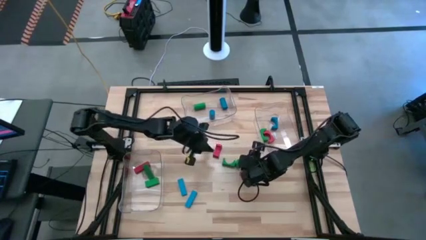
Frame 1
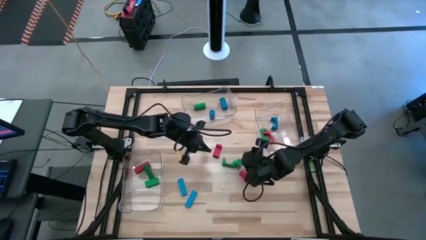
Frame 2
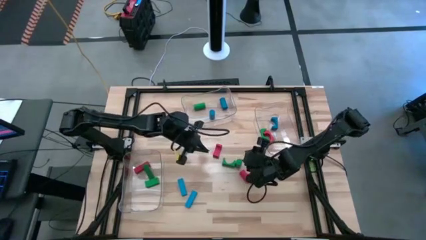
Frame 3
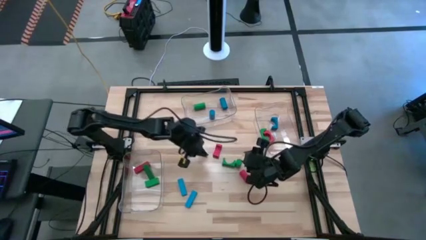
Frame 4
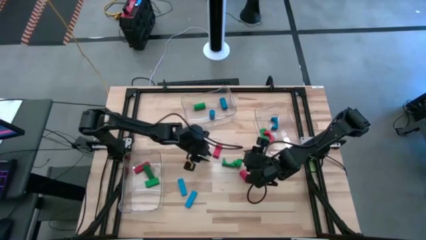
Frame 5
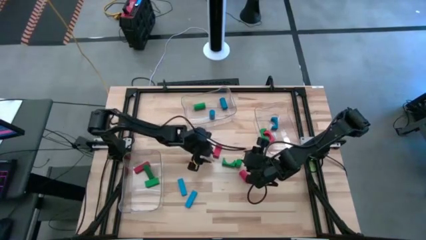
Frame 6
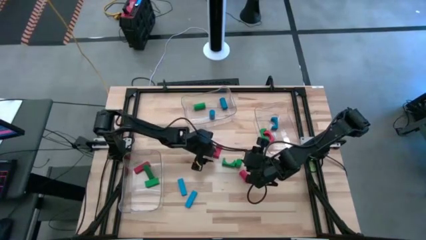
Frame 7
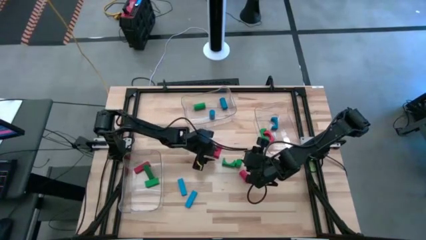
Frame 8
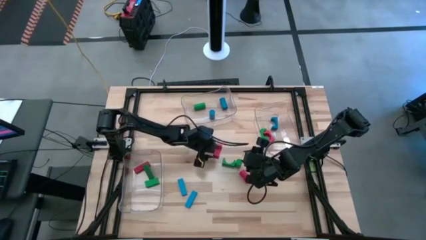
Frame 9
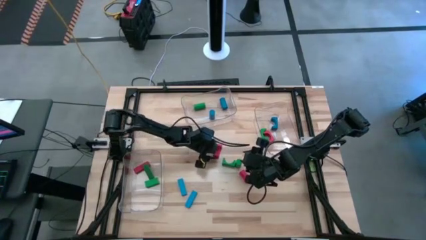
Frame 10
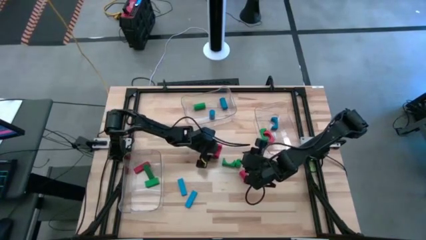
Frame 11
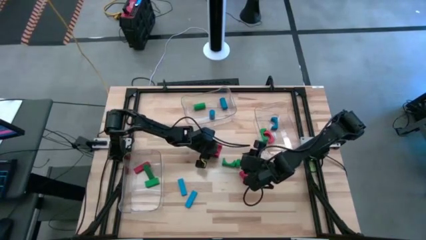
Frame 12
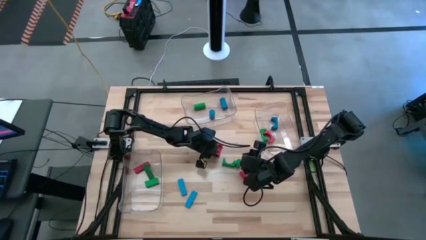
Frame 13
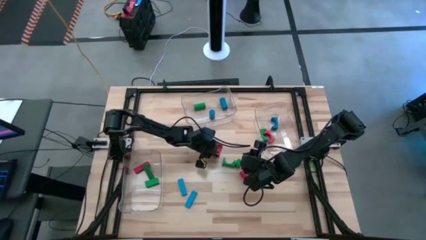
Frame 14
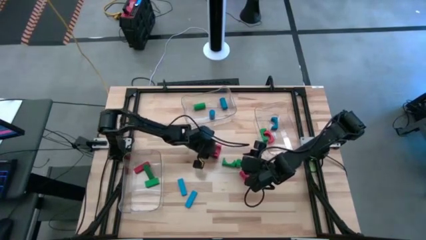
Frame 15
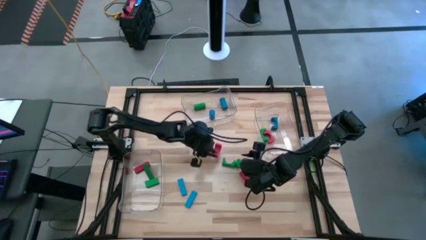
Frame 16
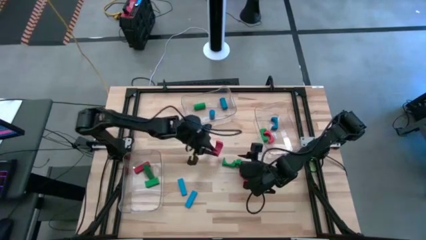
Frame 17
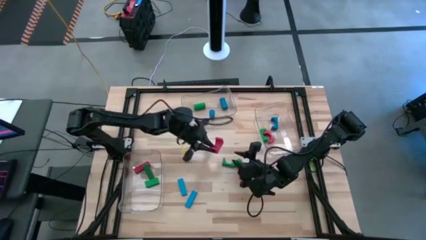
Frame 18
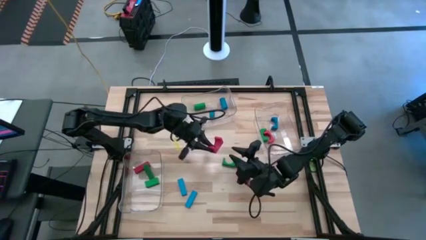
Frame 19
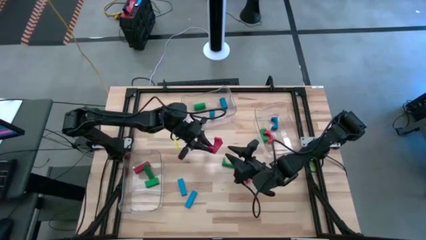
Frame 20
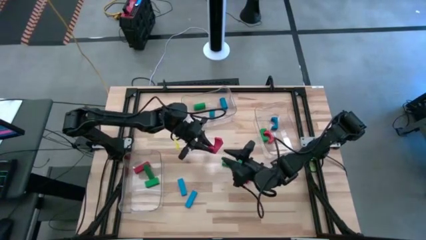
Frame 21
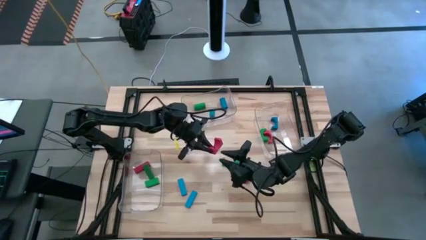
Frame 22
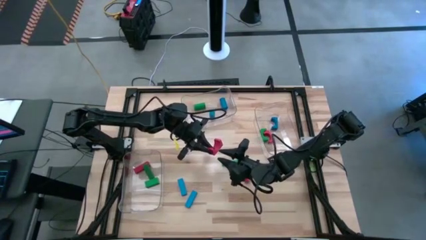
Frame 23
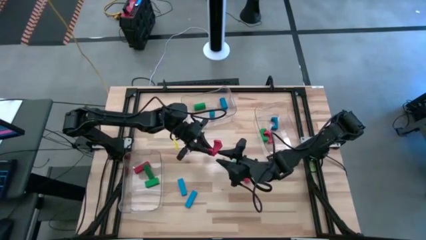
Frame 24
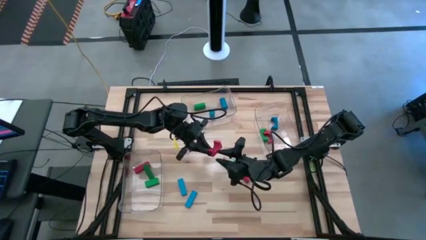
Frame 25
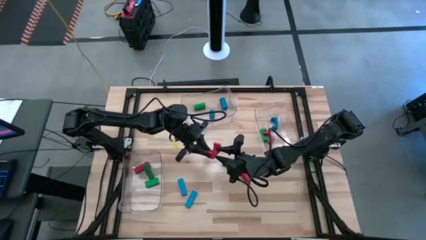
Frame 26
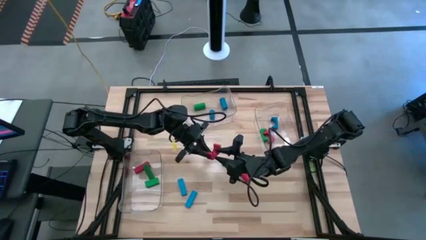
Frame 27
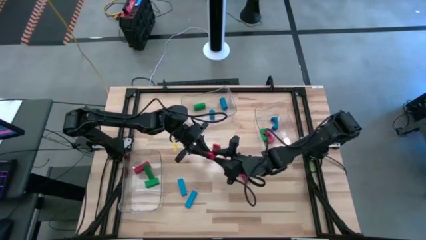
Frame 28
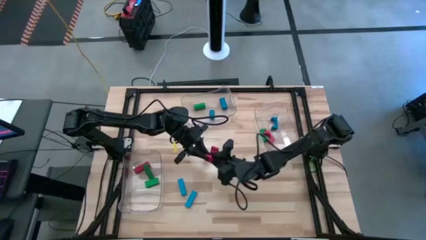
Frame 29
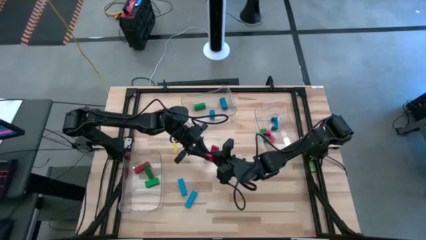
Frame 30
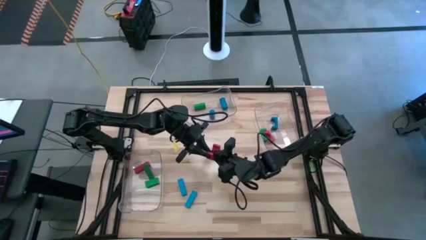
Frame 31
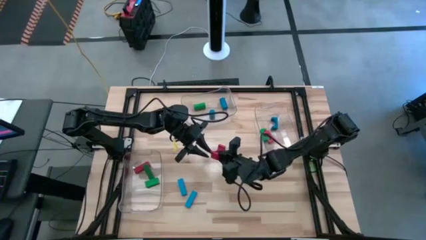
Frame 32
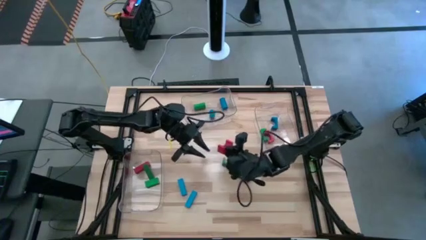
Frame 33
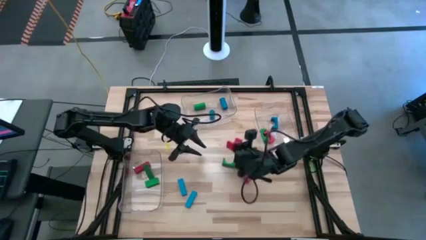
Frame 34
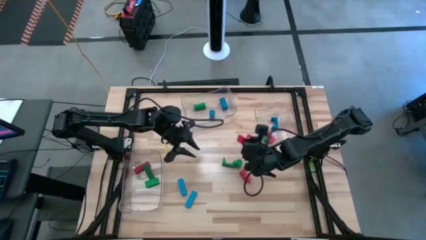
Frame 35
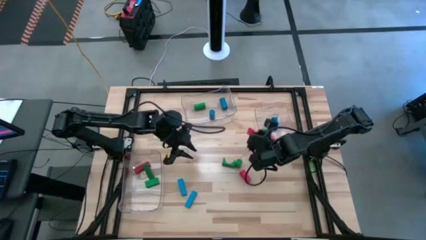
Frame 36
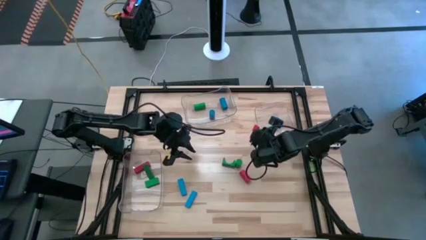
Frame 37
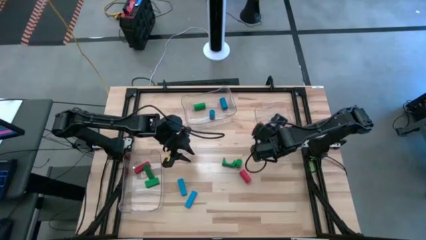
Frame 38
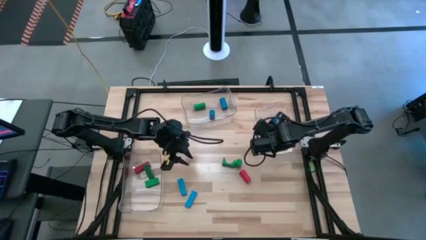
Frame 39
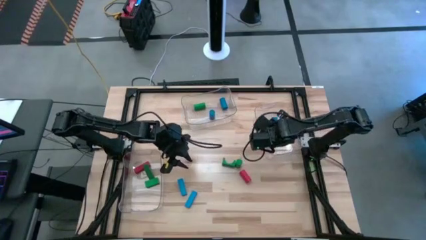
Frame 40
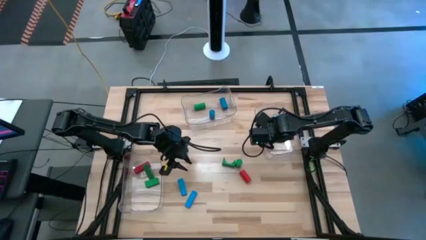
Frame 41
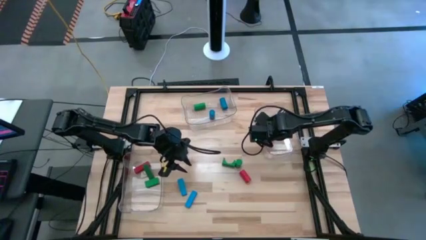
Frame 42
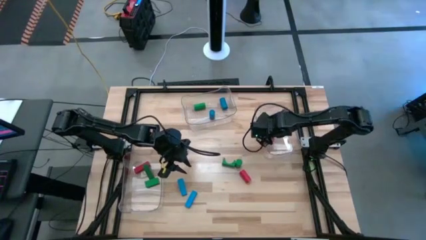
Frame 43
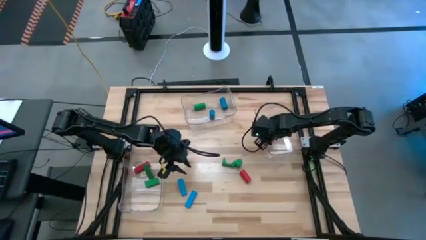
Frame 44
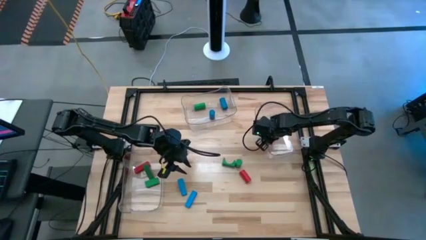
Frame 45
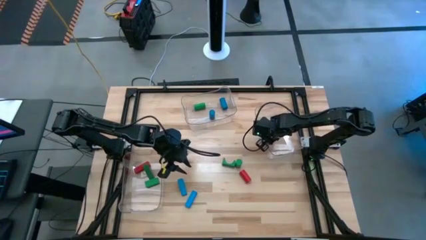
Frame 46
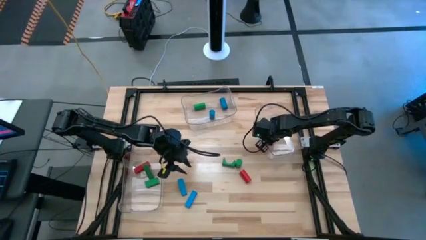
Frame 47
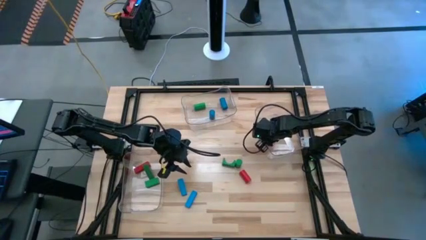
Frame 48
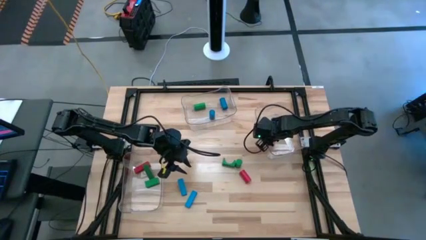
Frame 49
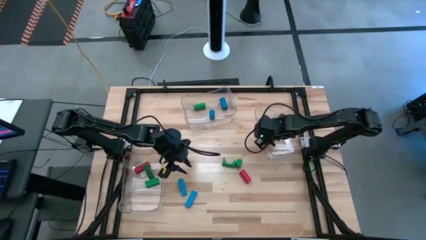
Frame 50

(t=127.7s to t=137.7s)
Task: Sort blocks by size
Put the red arch block into the right transparent bin

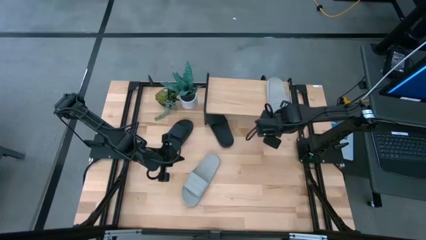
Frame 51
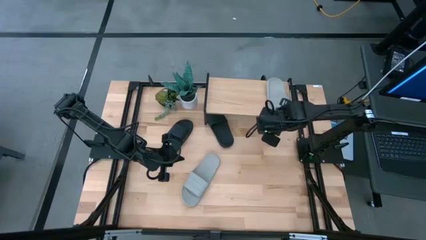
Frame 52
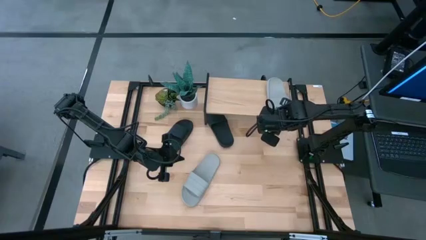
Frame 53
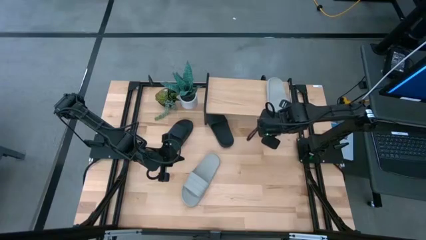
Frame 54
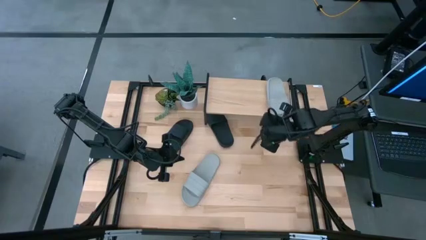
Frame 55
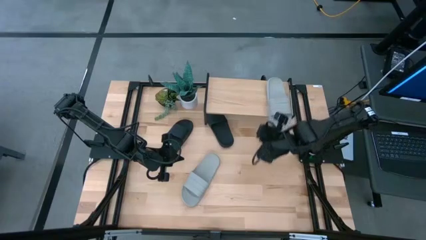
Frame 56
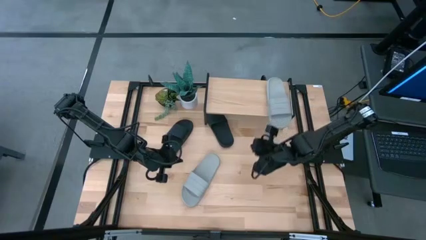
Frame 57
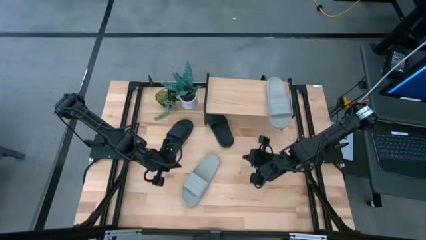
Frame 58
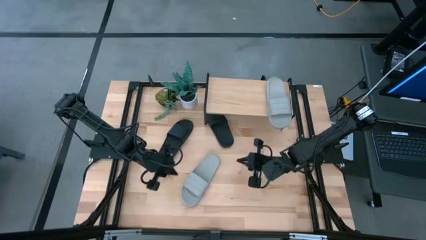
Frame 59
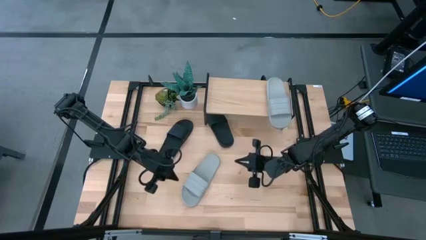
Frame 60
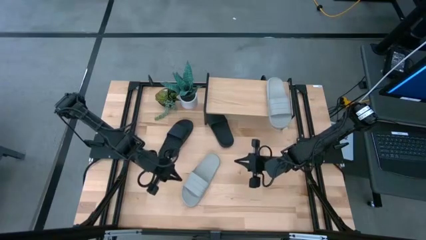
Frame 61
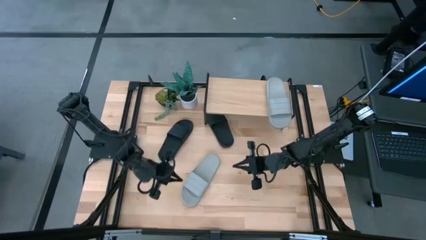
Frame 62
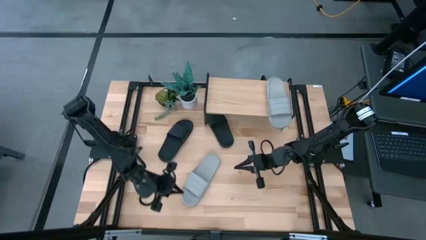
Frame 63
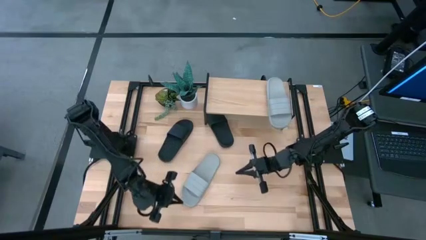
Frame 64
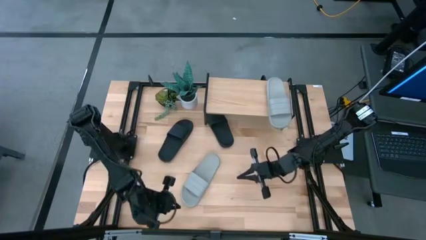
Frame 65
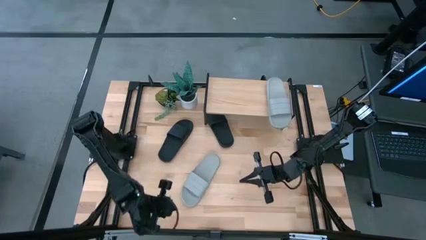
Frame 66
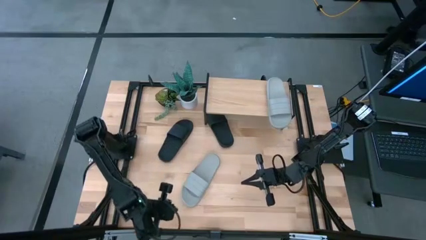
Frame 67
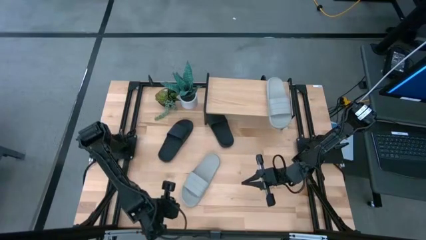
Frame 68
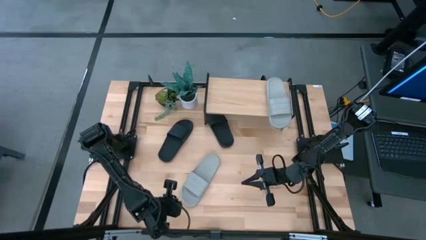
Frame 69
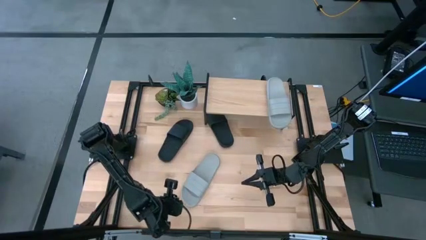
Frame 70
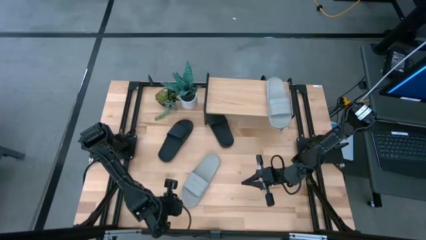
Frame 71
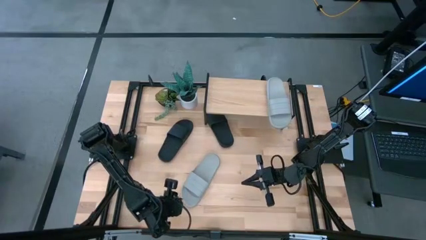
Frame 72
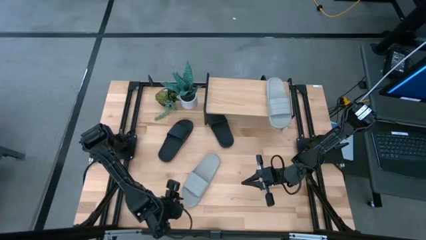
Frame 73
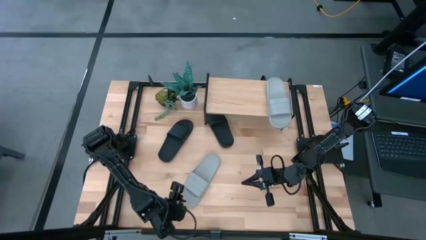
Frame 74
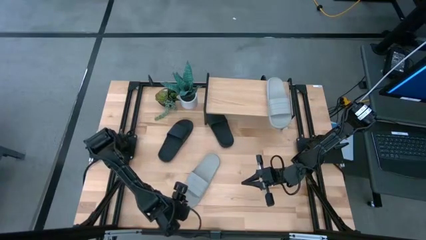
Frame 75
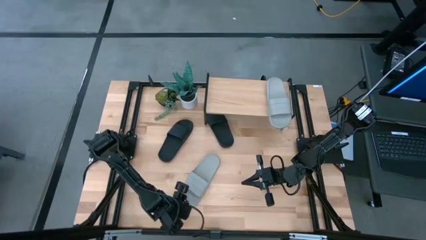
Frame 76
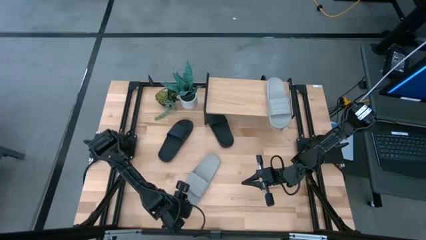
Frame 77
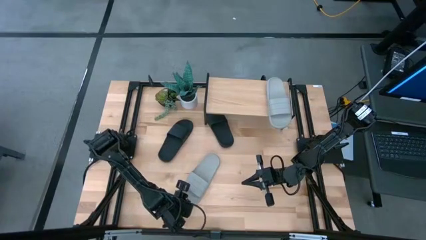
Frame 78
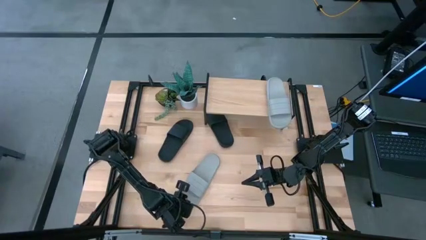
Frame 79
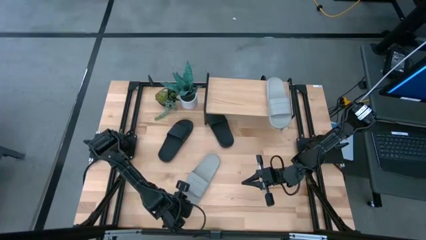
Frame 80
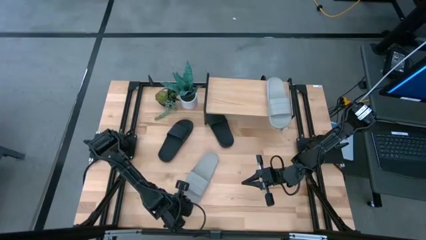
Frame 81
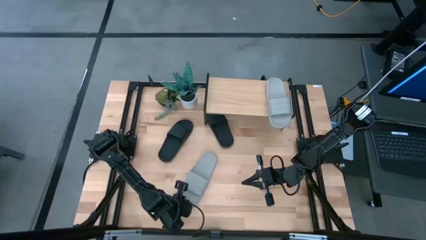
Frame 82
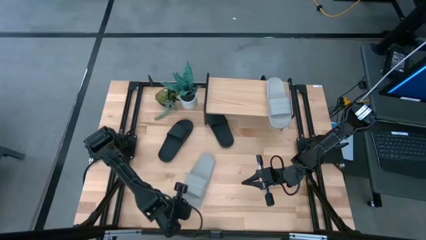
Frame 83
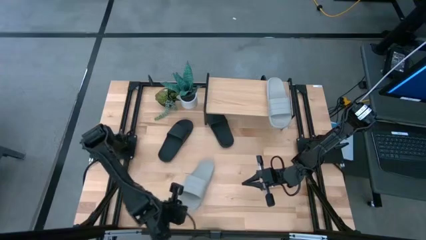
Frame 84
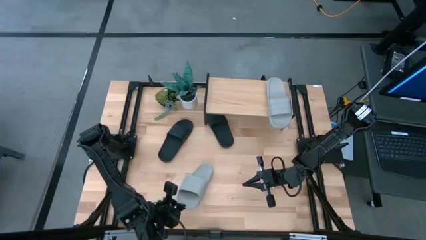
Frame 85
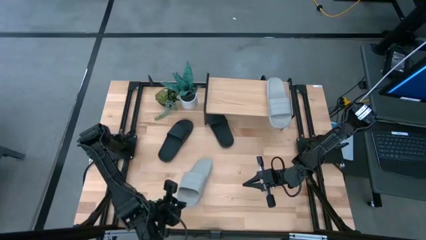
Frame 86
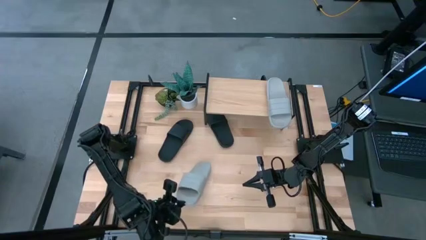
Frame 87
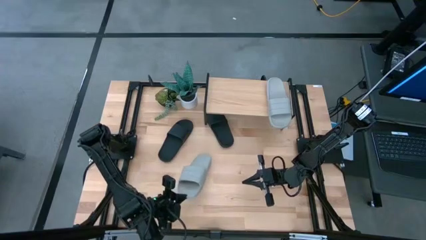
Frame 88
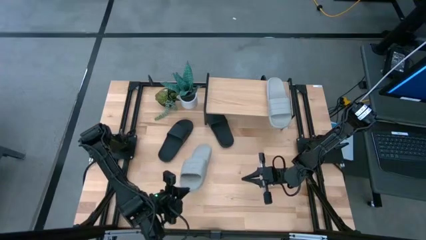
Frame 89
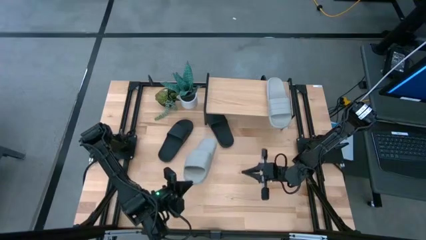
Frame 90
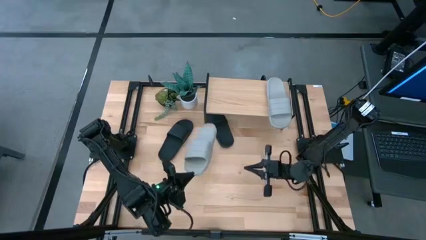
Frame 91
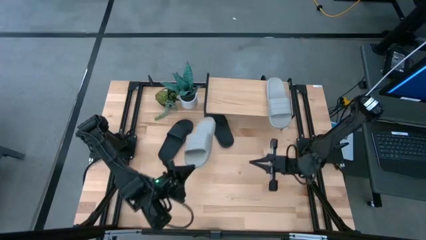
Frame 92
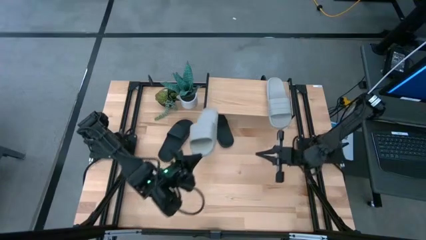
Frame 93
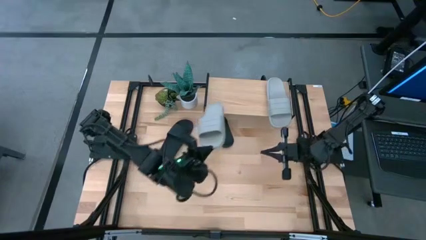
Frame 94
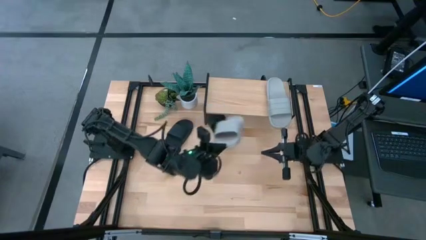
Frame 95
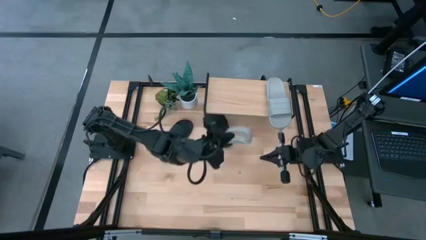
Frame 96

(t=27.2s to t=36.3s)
Task: Pick and place slides into the shelf
Put the gray slipper on the shelf
